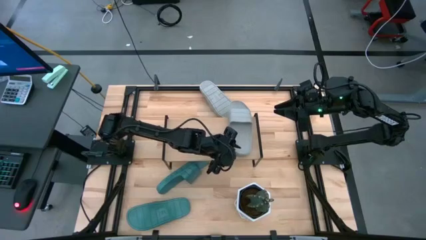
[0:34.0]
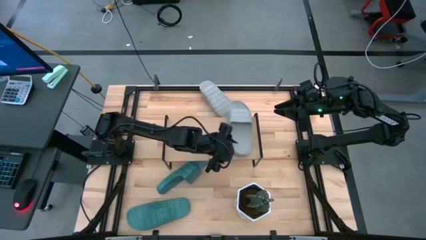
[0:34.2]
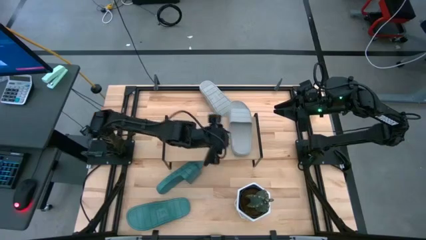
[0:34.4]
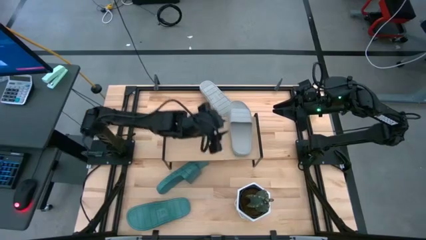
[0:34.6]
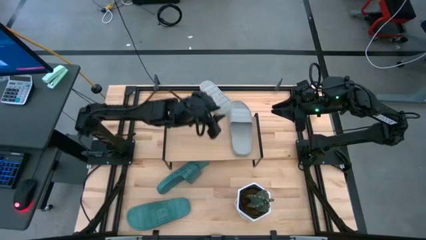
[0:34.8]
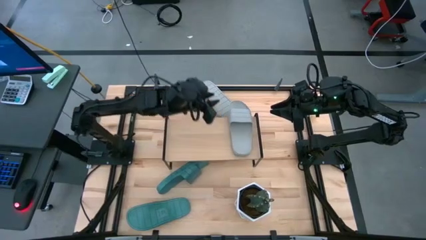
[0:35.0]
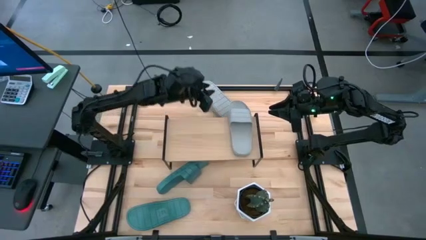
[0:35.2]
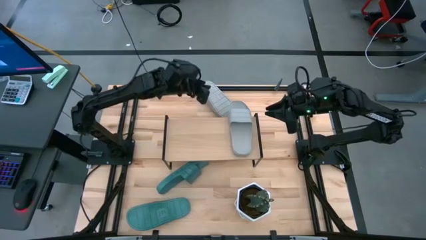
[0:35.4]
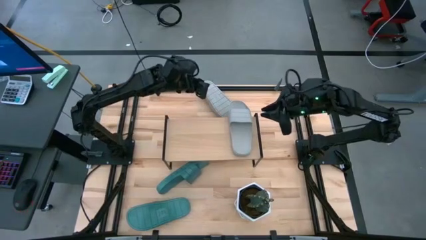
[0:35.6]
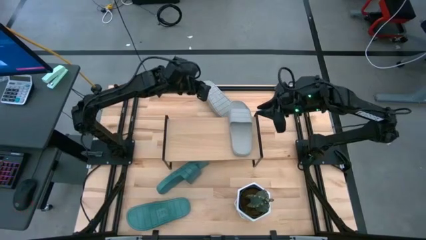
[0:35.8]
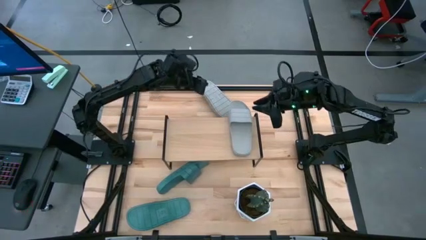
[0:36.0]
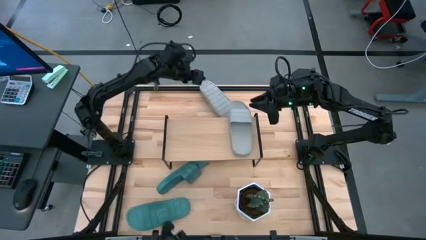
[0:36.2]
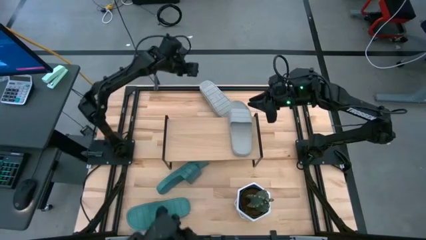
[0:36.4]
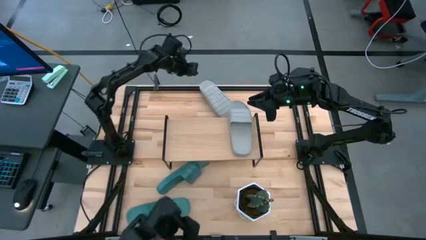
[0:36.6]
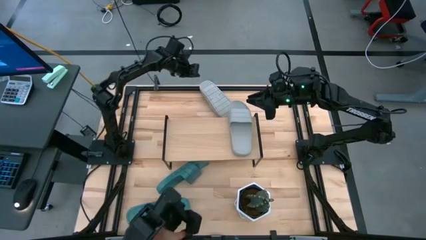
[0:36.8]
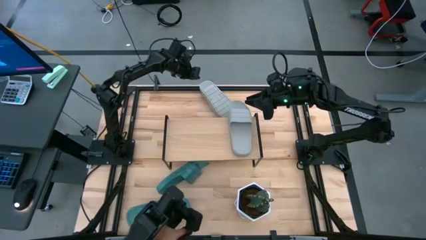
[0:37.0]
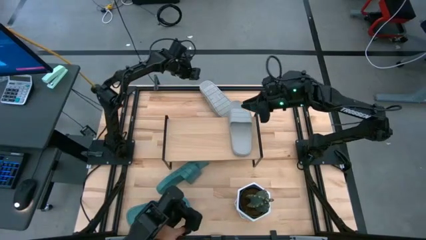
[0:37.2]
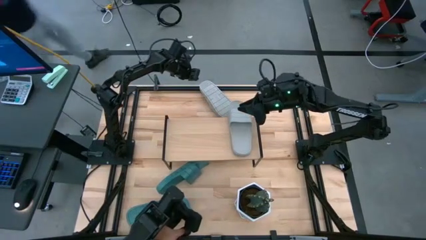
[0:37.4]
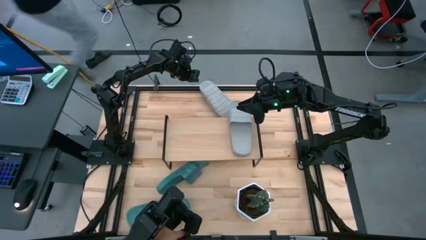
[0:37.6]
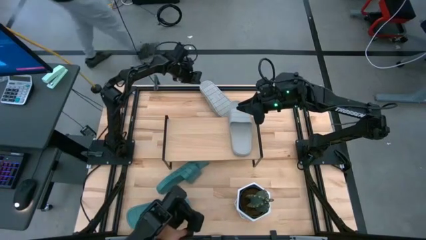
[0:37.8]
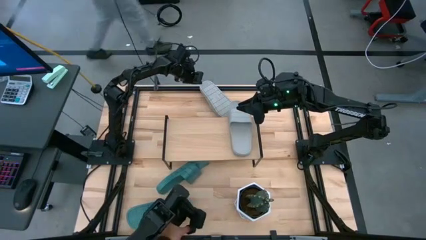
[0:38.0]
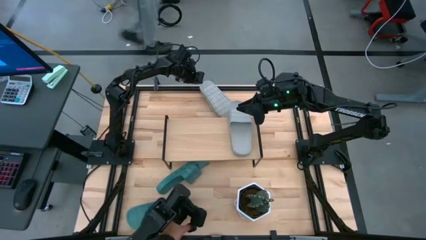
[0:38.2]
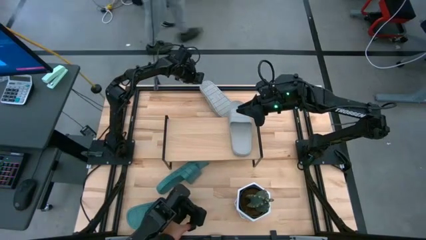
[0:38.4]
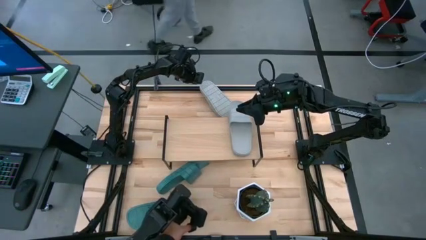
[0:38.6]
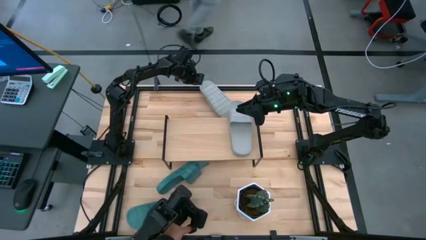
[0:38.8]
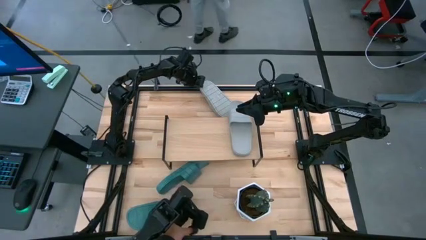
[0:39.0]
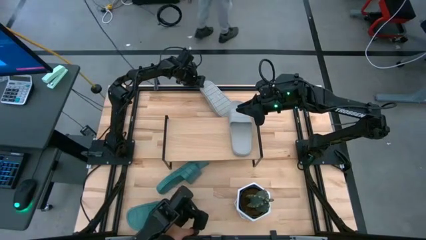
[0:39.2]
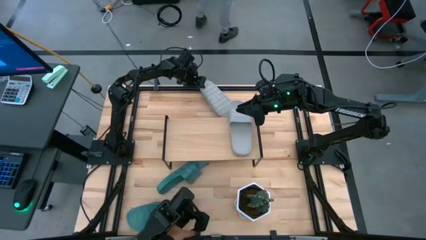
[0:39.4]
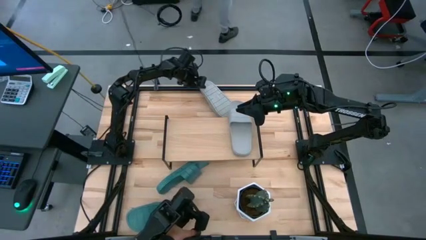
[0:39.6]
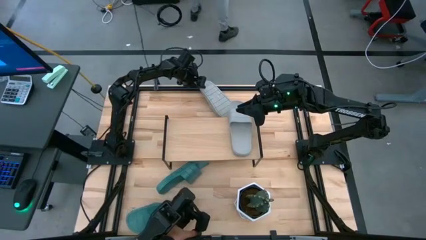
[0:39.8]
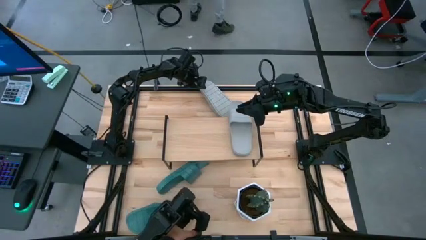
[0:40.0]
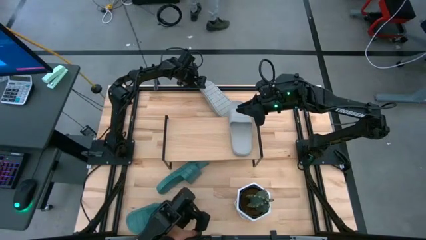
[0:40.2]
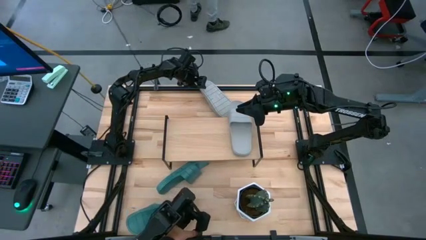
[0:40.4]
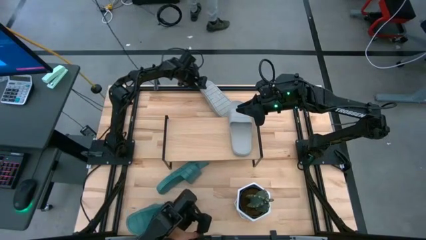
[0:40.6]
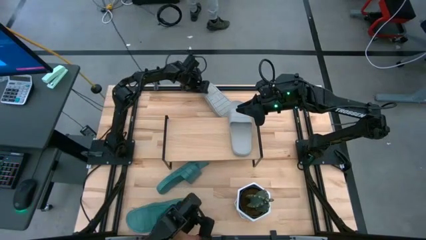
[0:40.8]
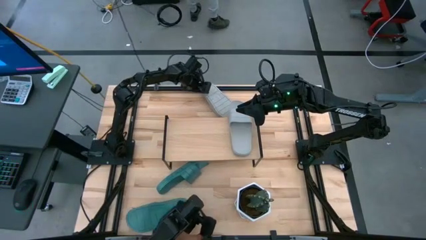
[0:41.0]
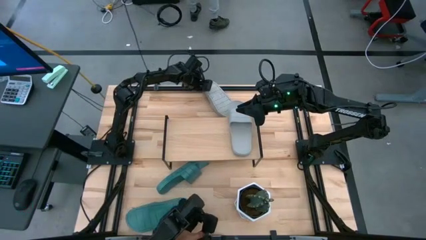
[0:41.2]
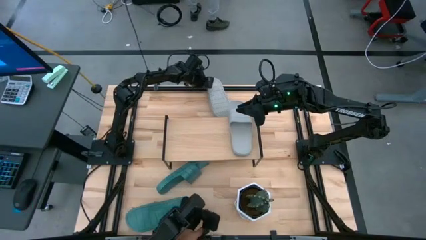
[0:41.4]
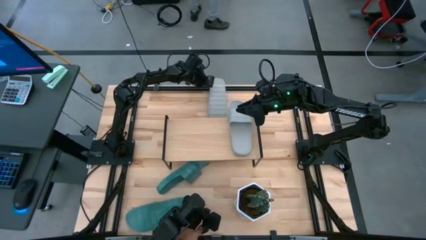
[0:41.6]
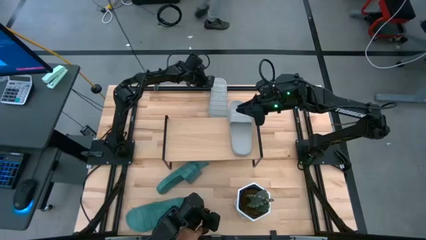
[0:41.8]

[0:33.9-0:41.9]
Task: Pick and place slides into the shelf
Put the gray slide on the shelf

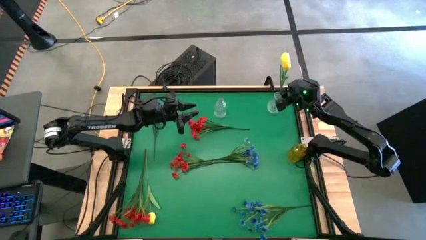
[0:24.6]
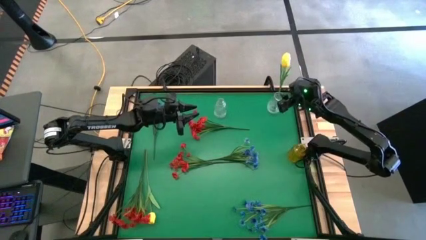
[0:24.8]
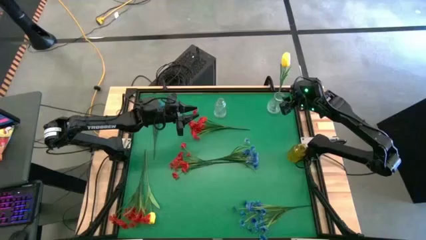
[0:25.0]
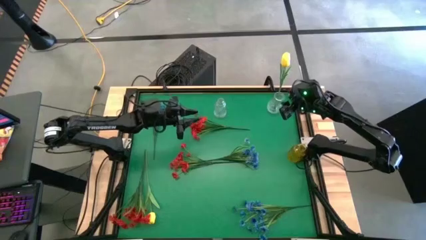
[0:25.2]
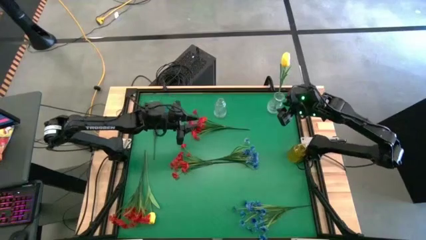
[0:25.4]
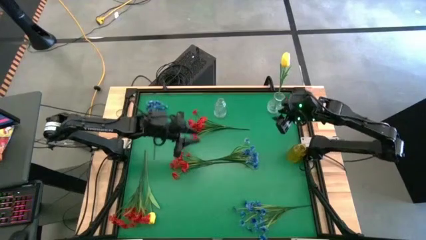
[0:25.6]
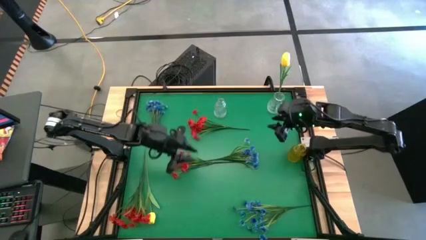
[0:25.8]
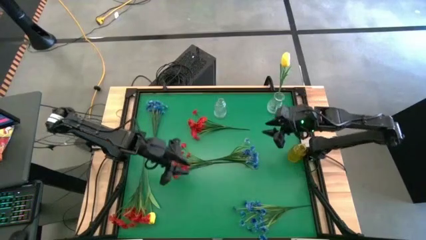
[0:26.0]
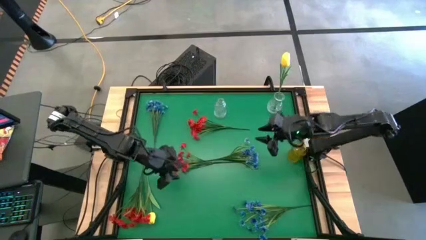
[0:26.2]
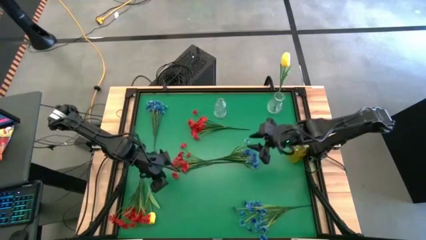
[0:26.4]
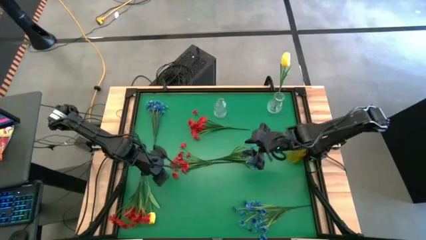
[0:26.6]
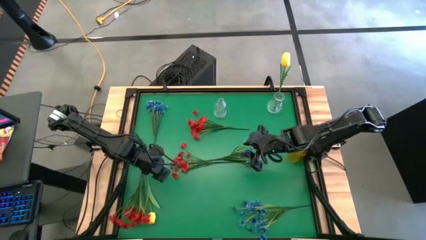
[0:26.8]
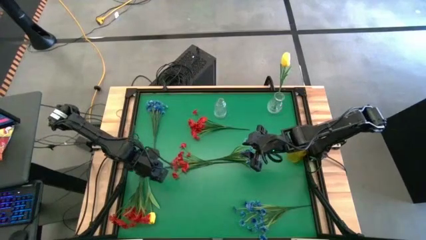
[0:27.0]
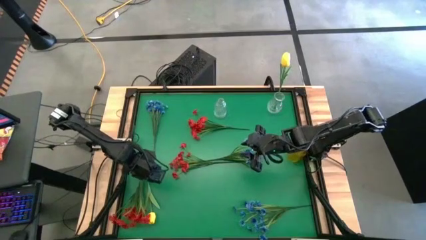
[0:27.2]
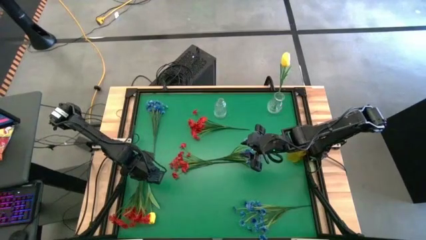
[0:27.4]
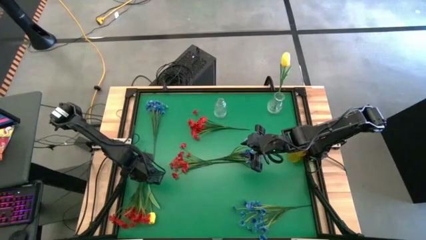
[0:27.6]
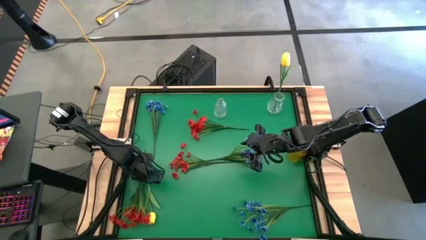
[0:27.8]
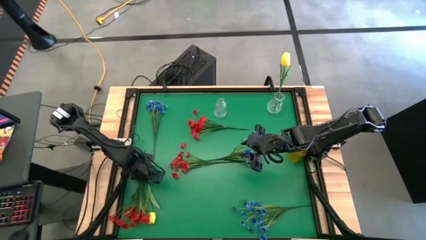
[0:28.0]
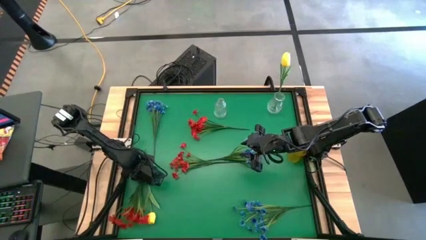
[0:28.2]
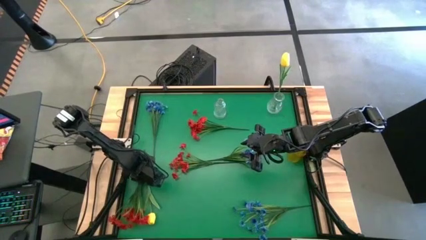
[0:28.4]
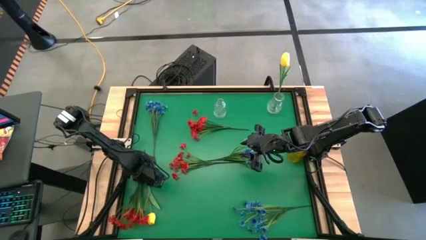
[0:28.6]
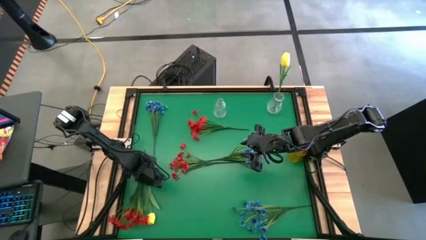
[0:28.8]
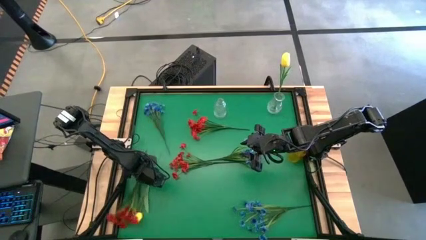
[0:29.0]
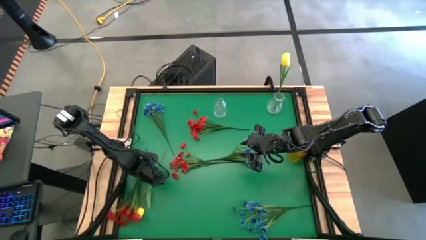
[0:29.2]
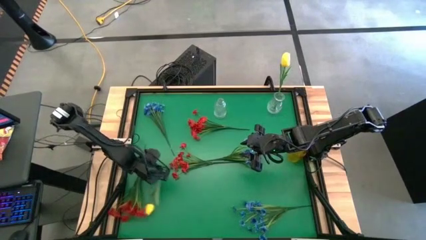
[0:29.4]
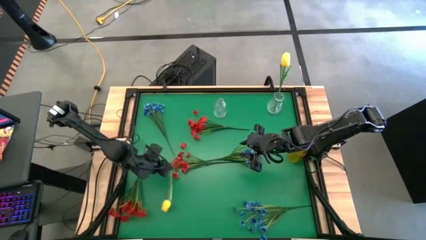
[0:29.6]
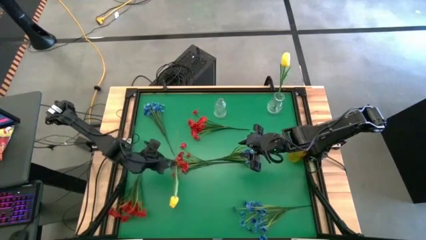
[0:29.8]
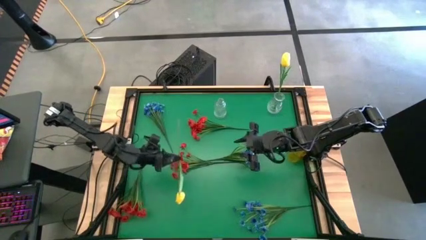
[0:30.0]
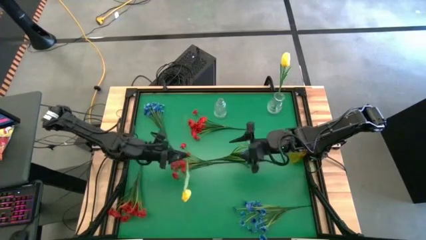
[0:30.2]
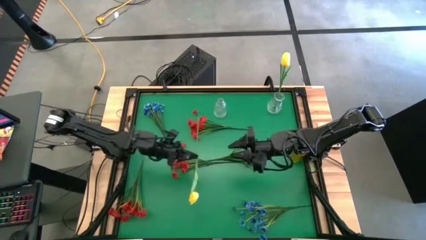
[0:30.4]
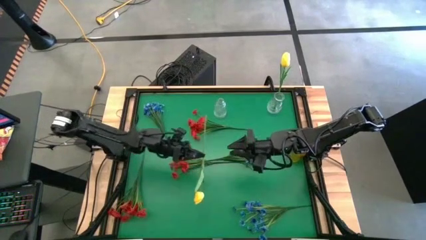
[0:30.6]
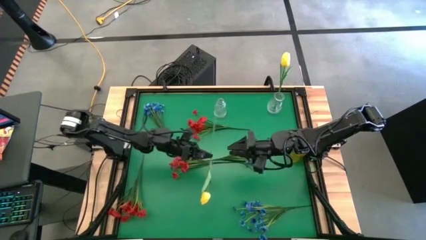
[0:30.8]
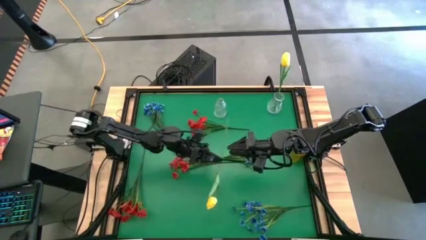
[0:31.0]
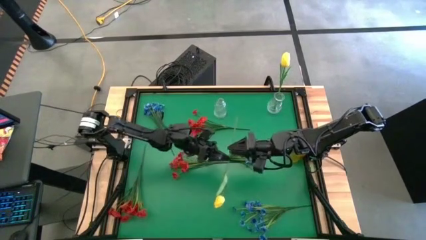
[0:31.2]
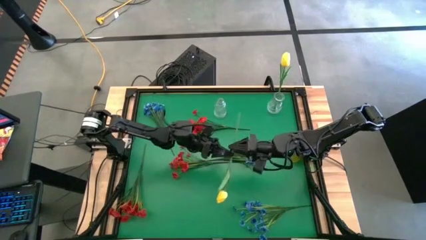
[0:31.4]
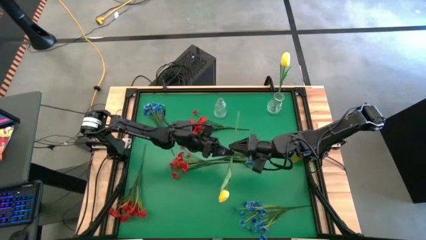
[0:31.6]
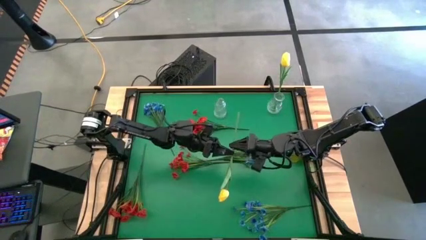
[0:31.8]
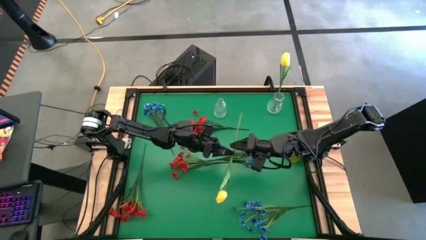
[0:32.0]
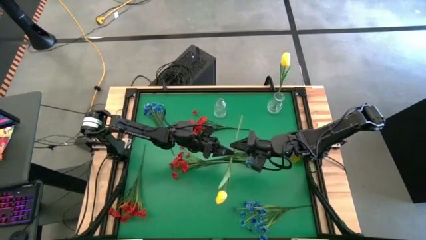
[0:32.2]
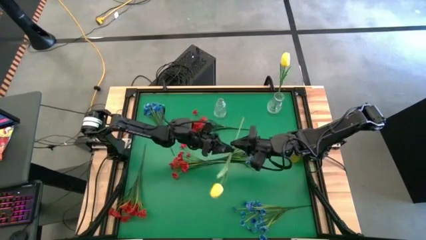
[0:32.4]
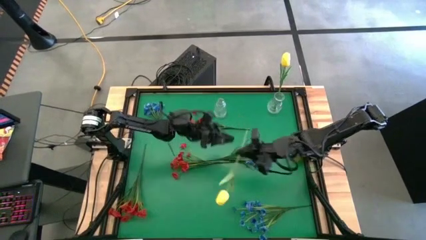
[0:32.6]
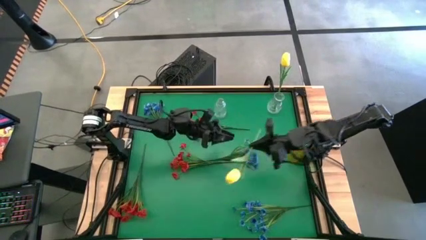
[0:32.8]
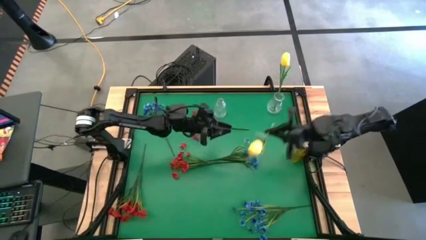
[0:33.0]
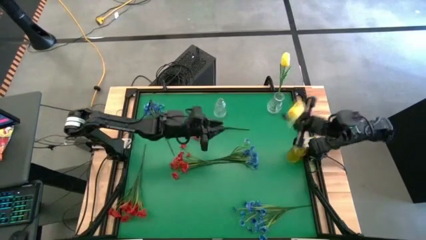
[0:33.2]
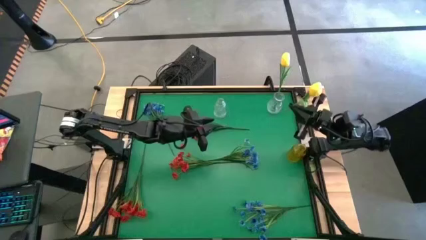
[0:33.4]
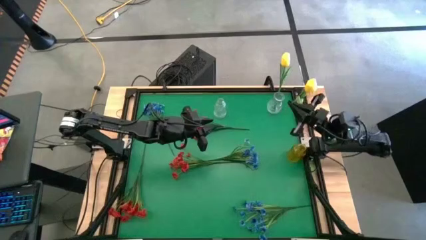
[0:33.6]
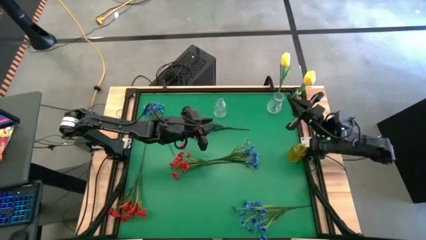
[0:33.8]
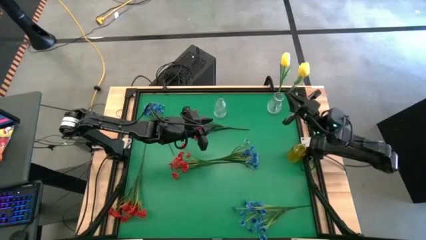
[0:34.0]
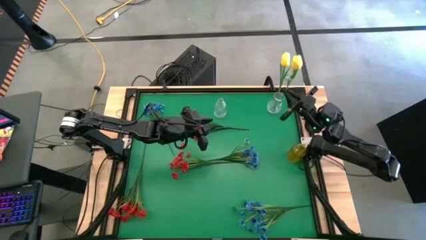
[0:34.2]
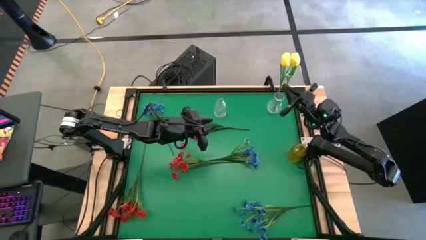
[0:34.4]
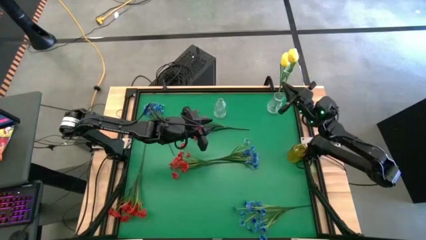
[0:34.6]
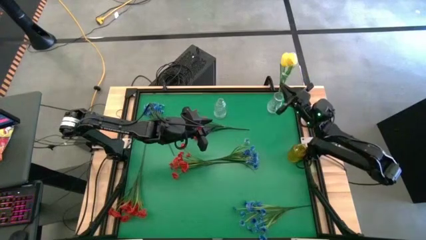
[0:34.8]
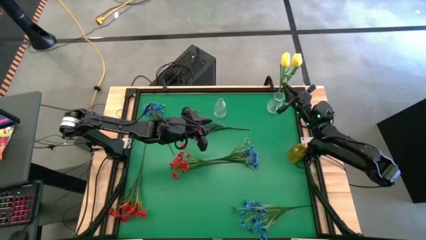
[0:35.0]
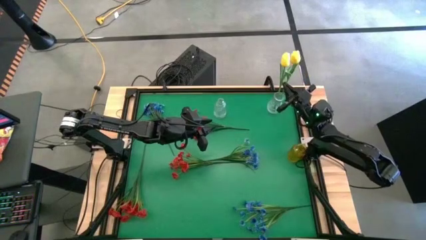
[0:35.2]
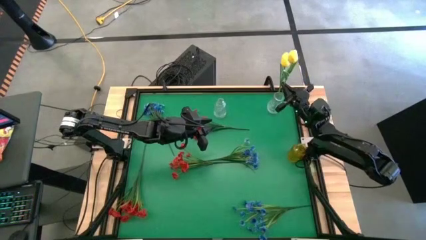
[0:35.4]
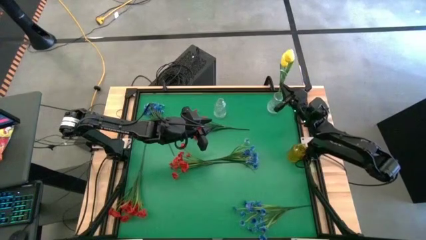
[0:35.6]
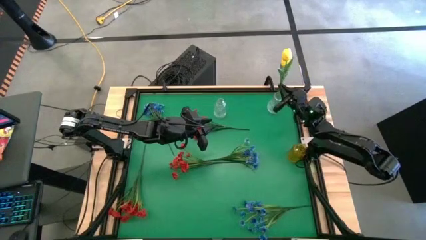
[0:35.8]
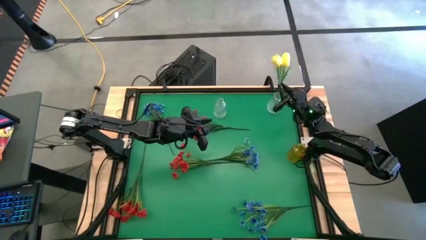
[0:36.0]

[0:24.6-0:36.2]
Task: Sort flowers into vase by color
Put the yellow flower into the right white transparent vase
